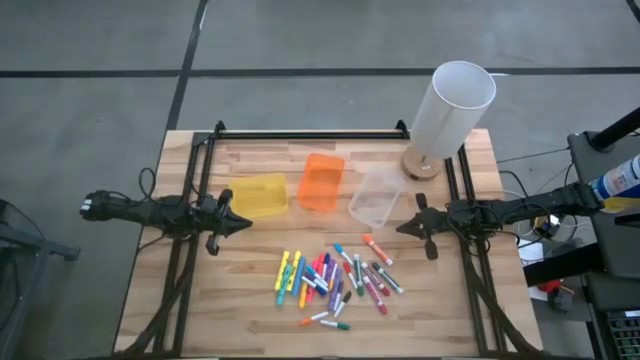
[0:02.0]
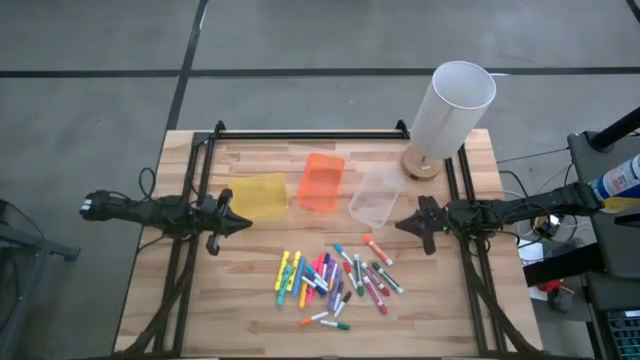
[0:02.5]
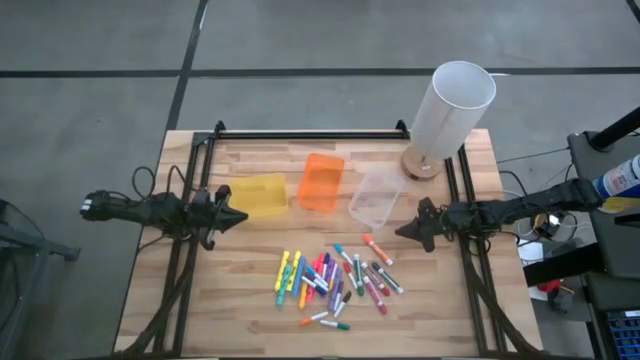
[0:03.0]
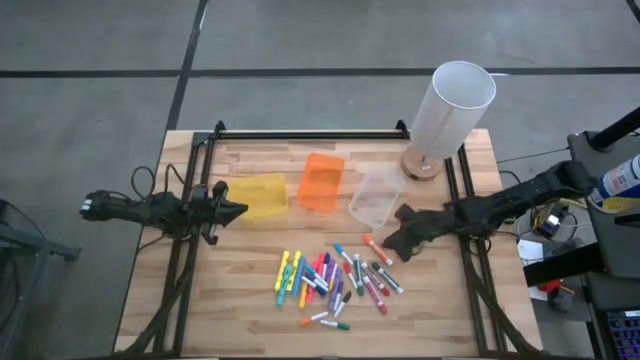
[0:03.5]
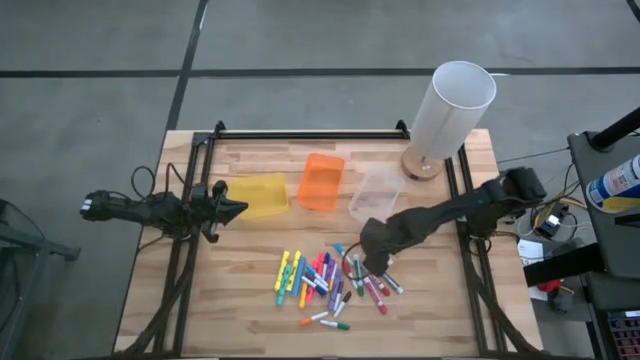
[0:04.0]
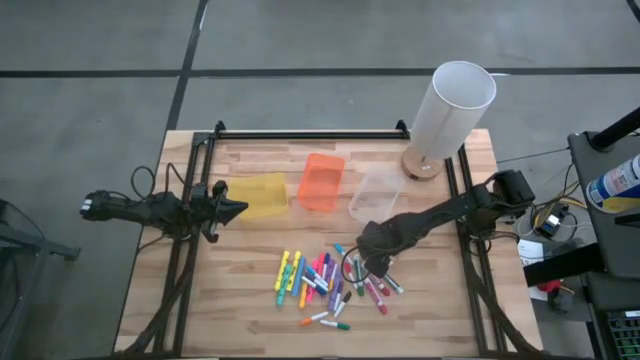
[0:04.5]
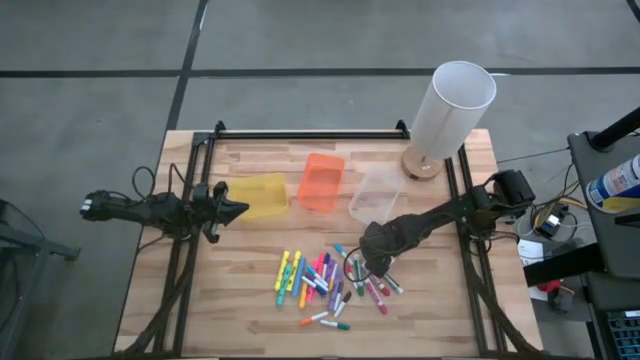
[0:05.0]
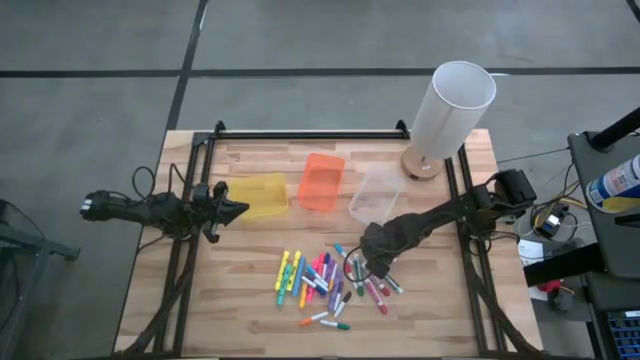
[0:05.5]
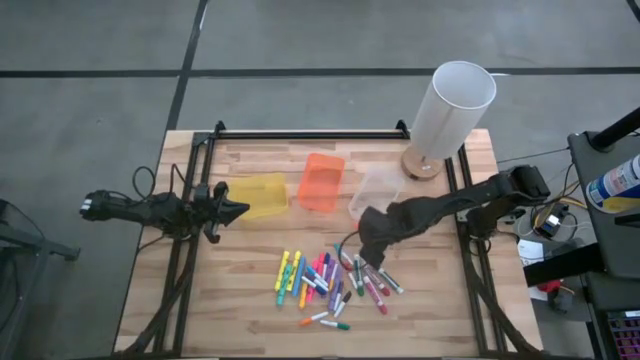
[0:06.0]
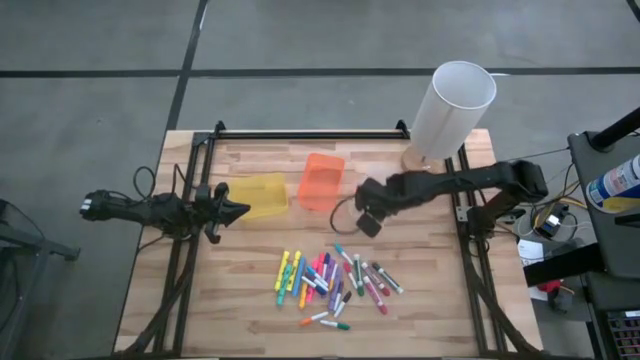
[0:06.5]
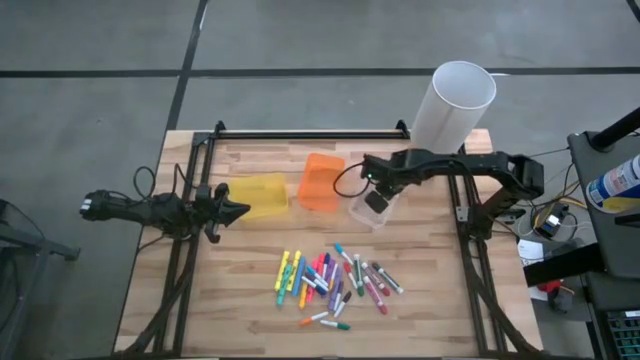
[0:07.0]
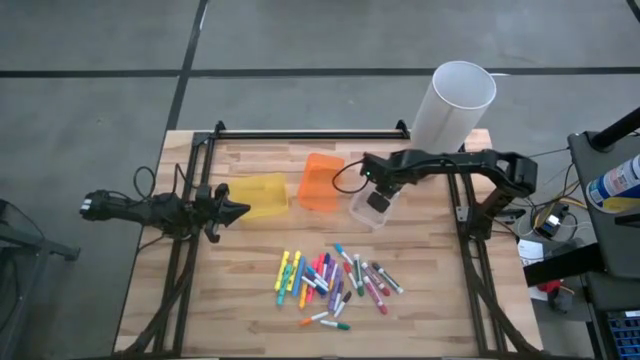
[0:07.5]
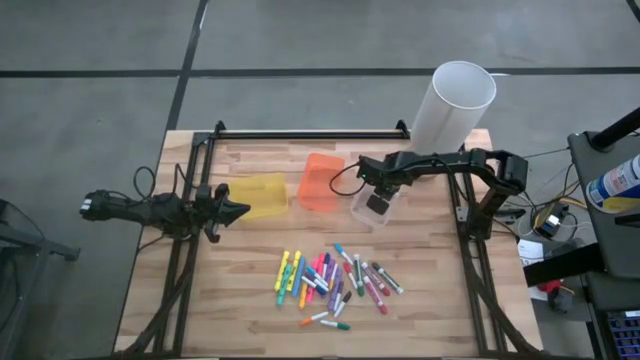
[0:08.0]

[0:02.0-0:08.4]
Task: Pick & Place Markers
Put the orange marker pen into the transparent bin

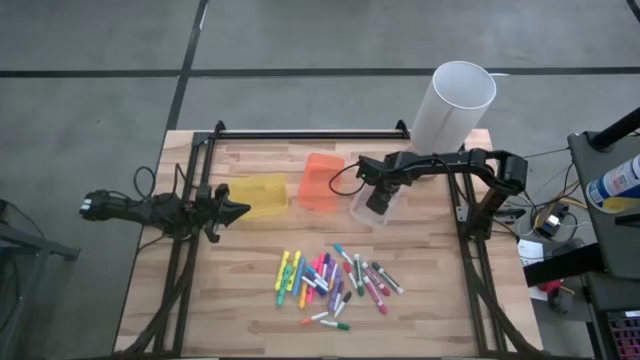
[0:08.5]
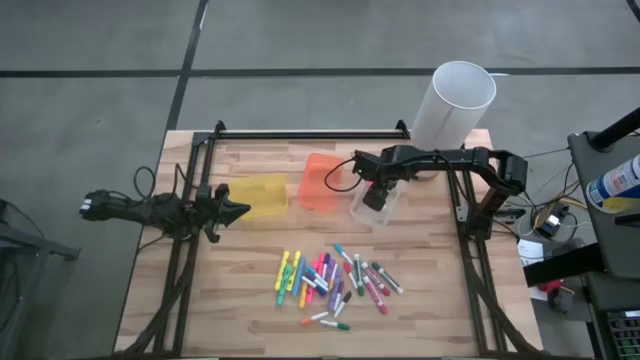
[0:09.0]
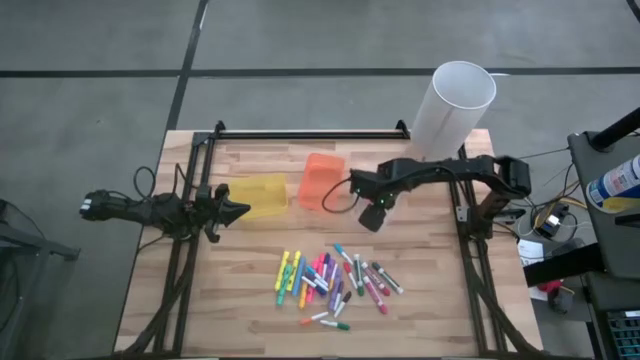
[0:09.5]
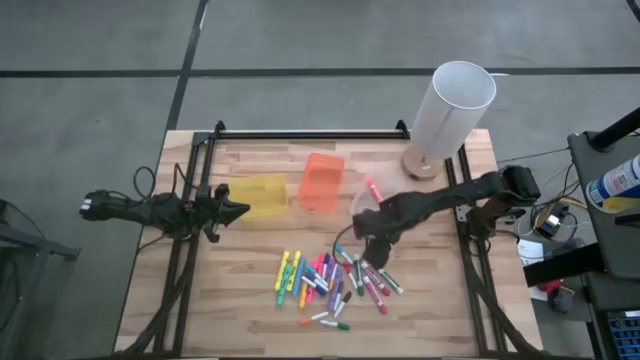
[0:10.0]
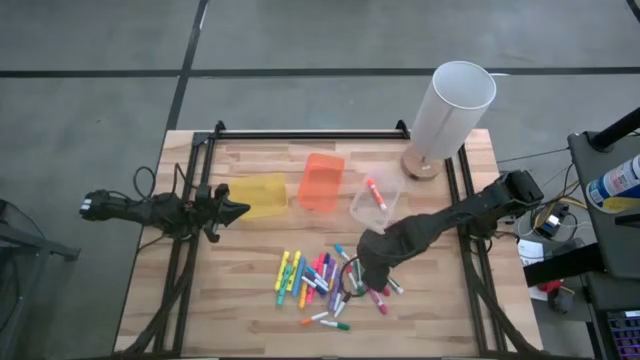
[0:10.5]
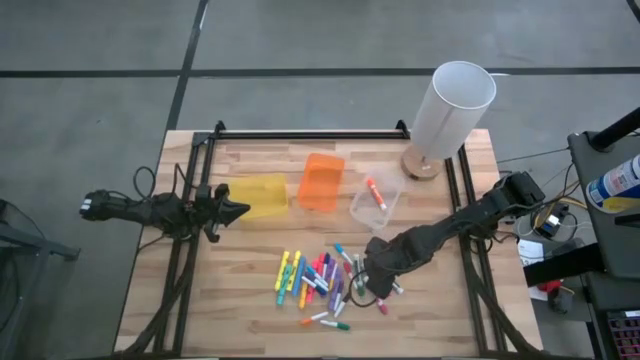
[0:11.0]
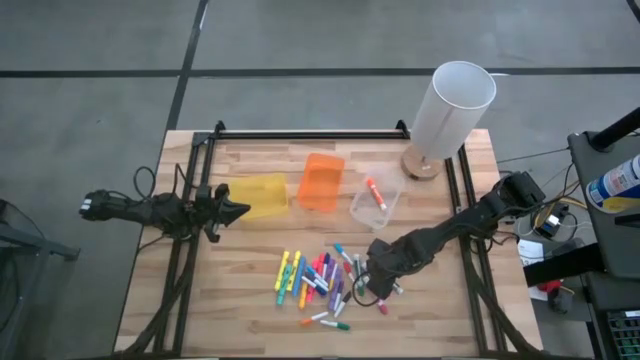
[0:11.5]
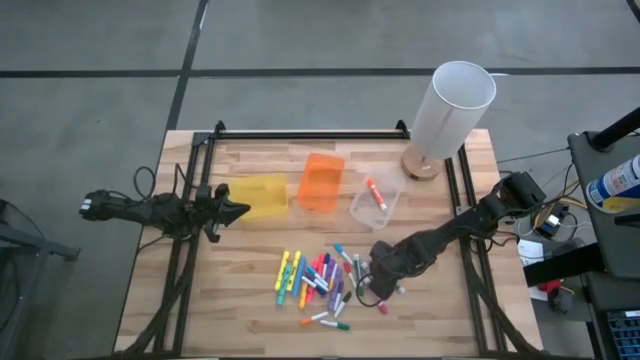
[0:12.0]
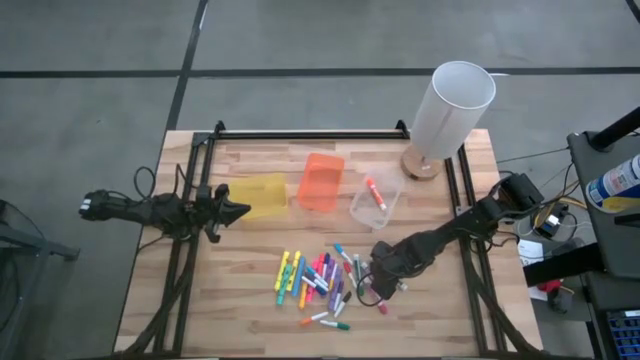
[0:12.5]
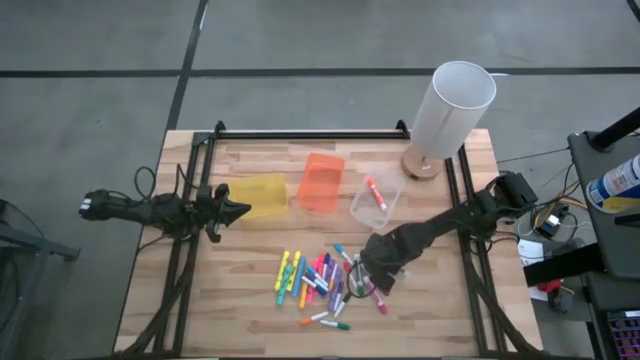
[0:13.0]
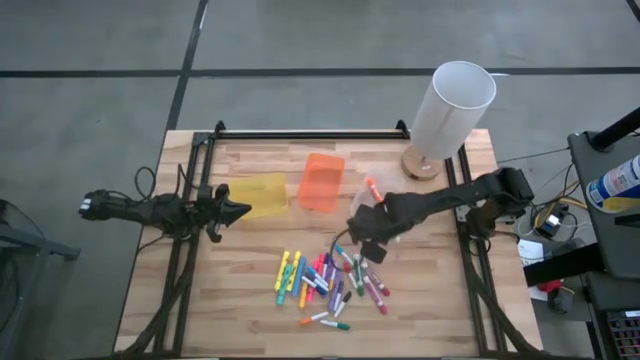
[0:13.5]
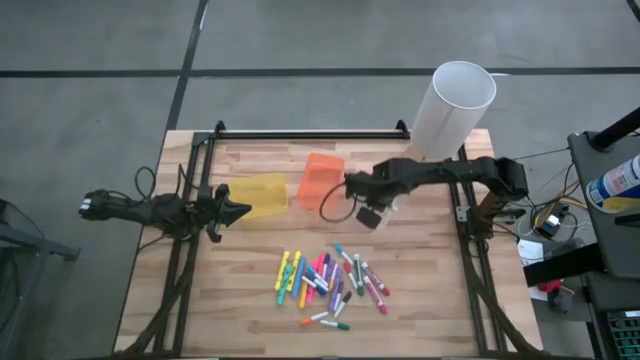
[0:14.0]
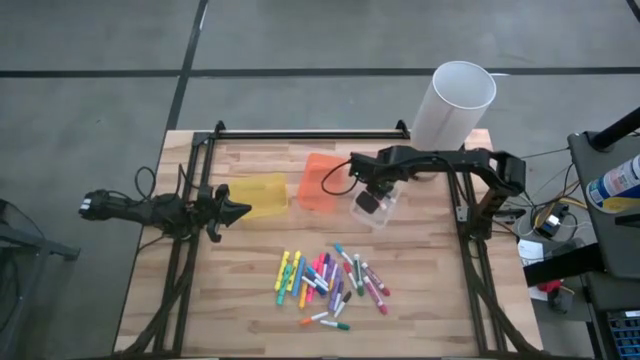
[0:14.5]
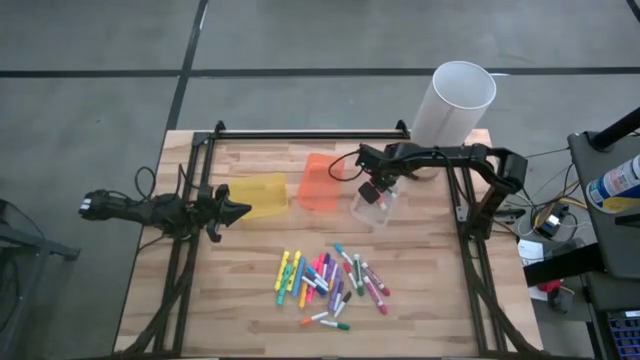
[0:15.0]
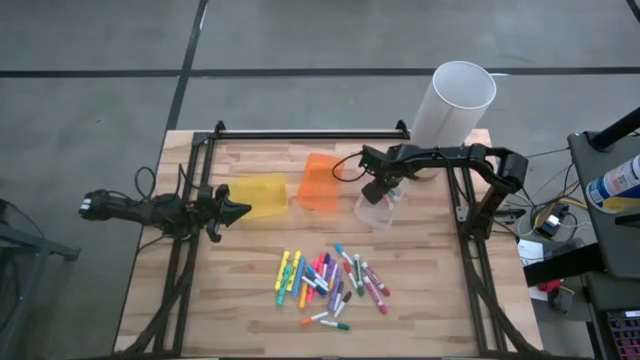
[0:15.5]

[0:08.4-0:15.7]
Put the dark green marker pen into the transparent bin

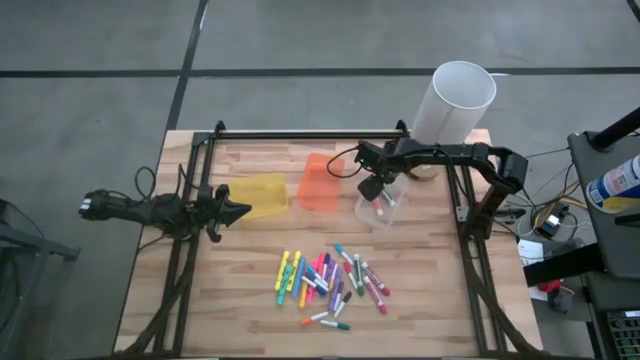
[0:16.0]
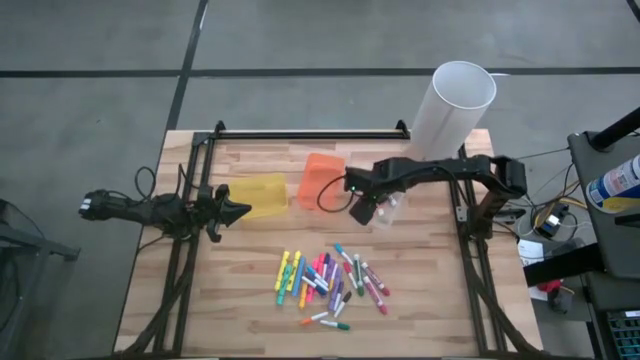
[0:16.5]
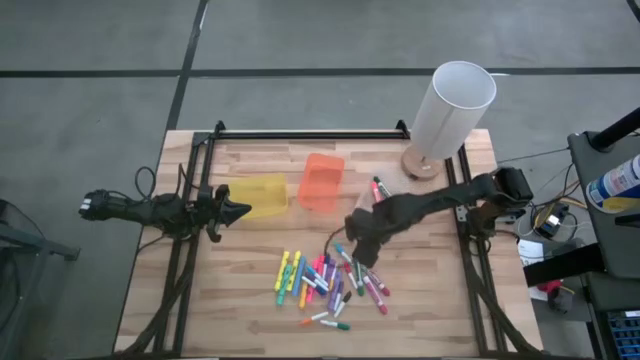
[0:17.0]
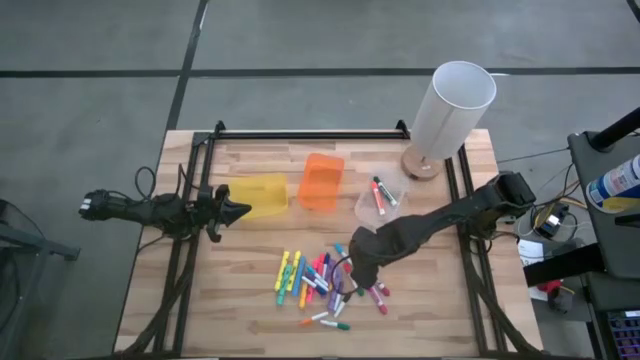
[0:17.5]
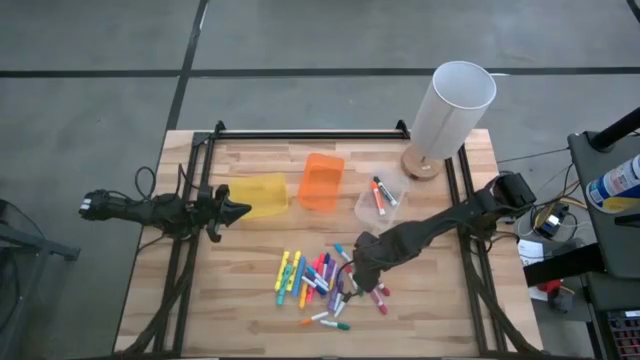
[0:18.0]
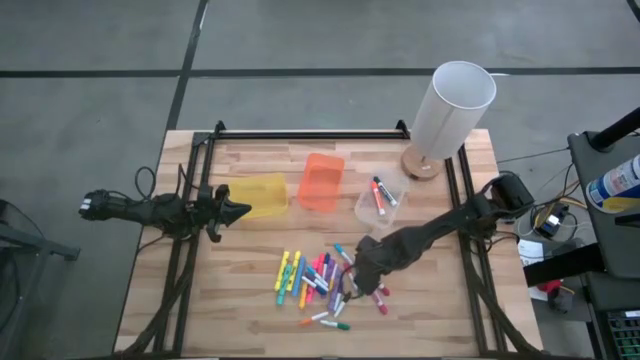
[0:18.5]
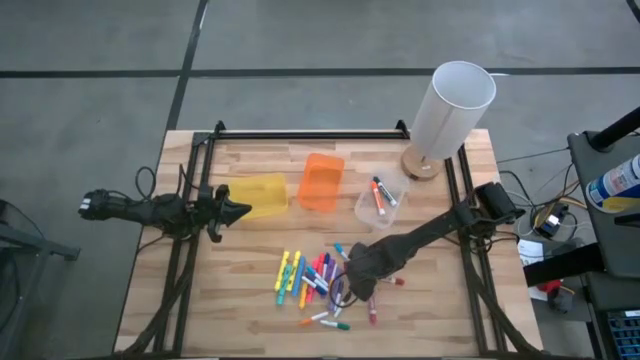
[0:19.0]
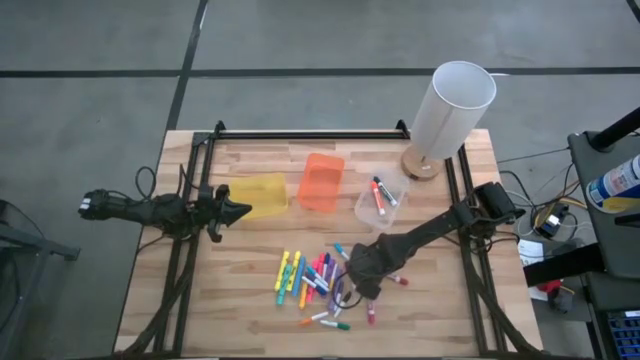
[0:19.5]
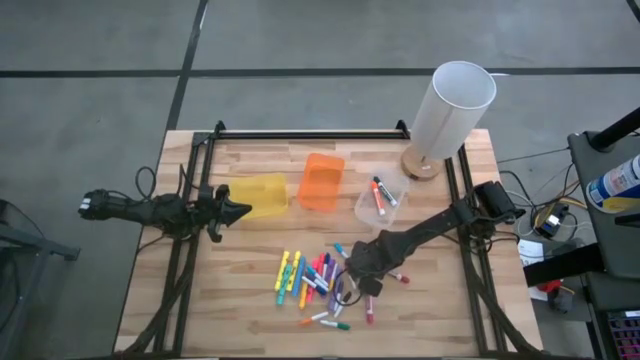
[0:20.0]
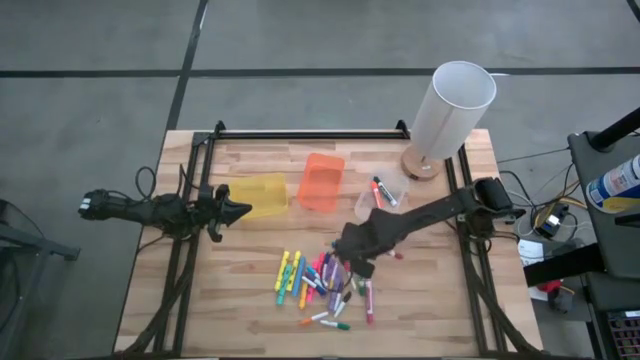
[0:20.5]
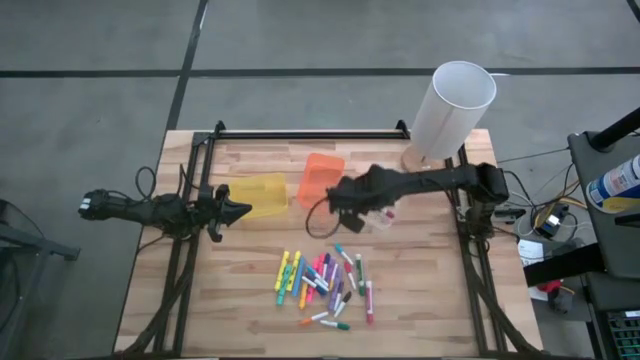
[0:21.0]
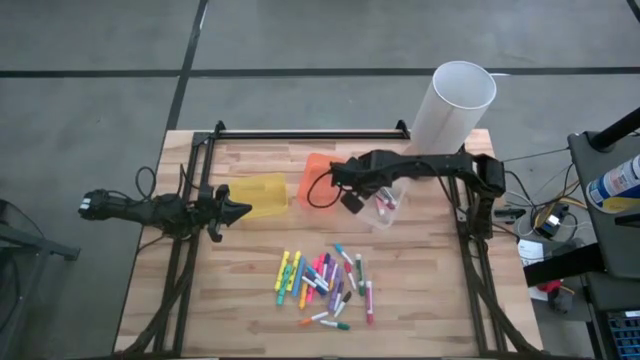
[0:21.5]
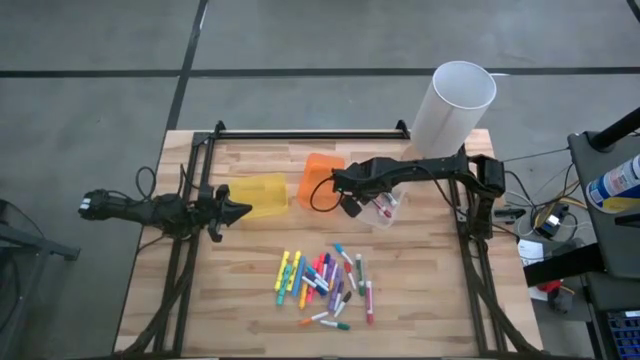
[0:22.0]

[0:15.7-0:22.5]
Put the red marker pen into the transparent bin

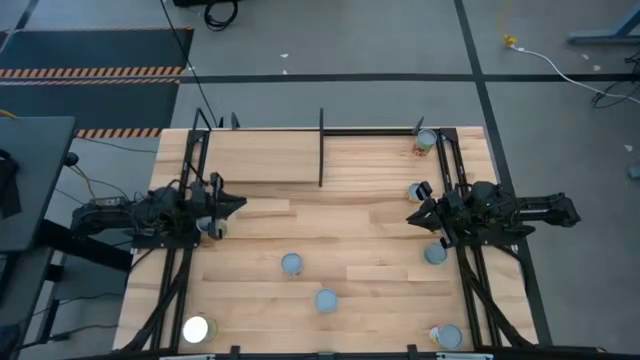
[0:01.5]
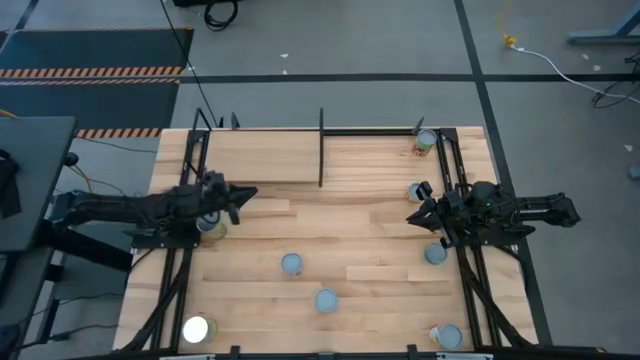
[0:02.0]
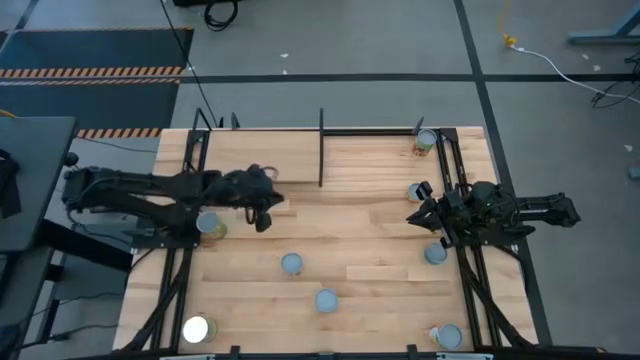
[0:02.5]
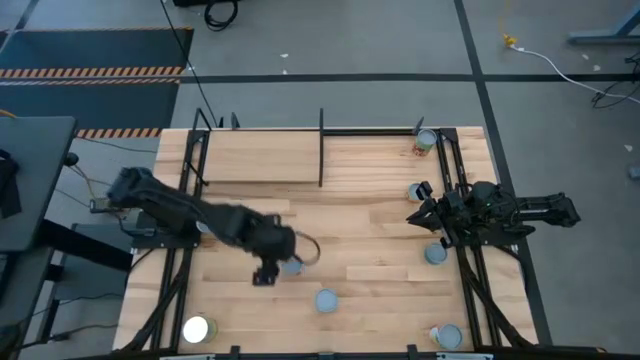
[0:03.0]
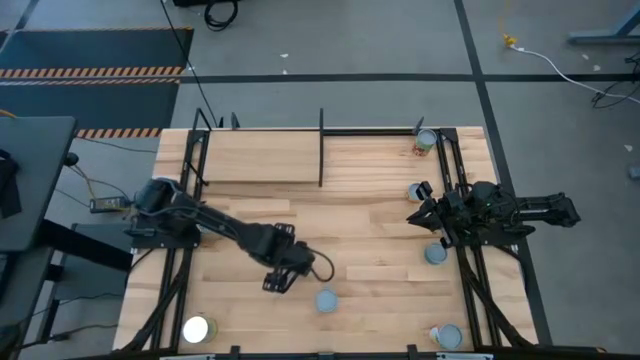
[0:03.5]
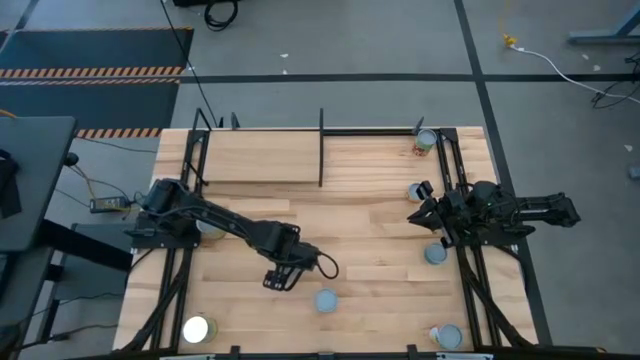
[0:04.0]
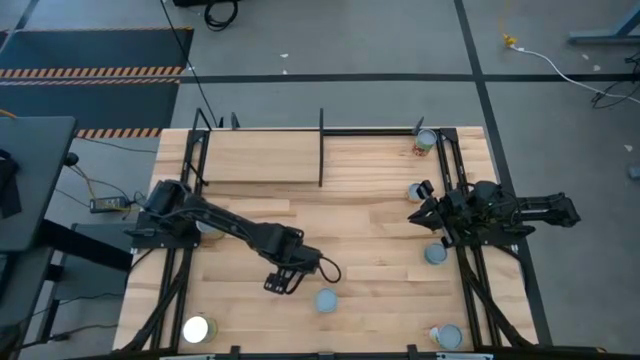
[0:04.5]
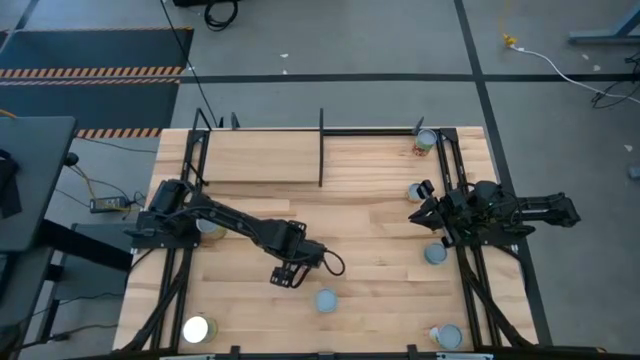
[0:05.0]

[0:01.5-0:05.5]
Task: Pick and place cans onto a shelf
Put the canned diced tomatoes on the shelf
